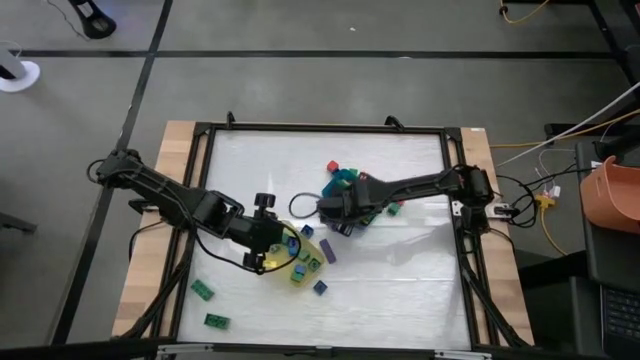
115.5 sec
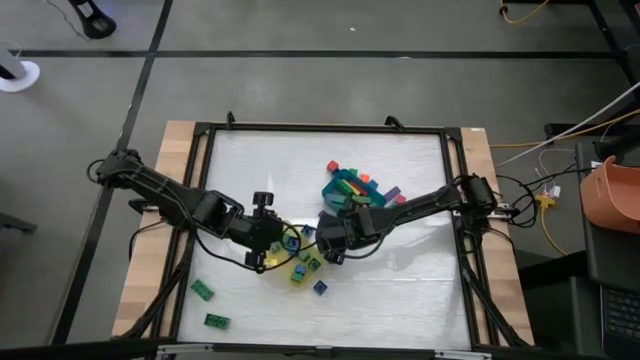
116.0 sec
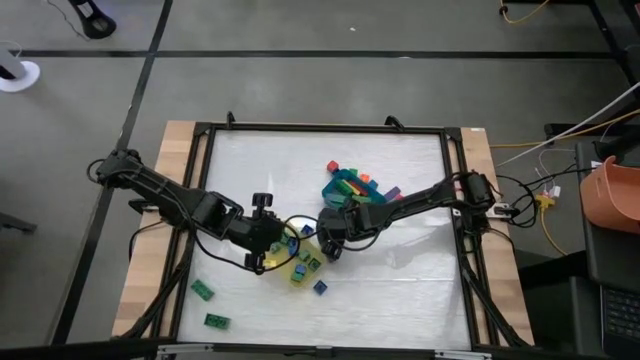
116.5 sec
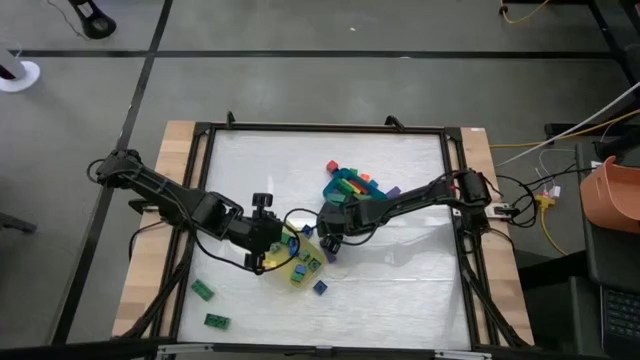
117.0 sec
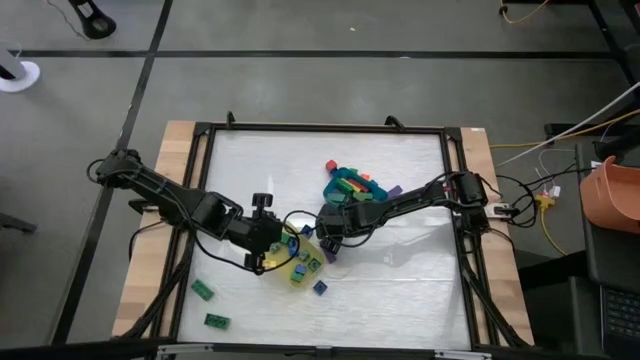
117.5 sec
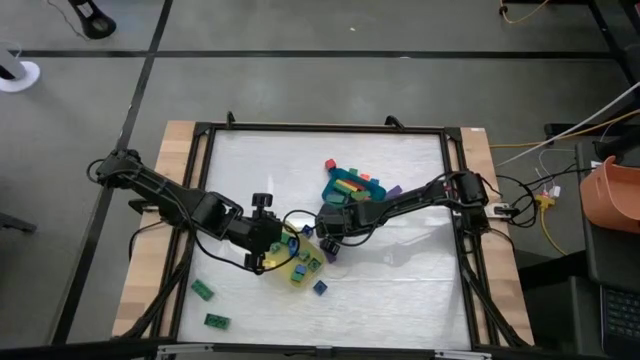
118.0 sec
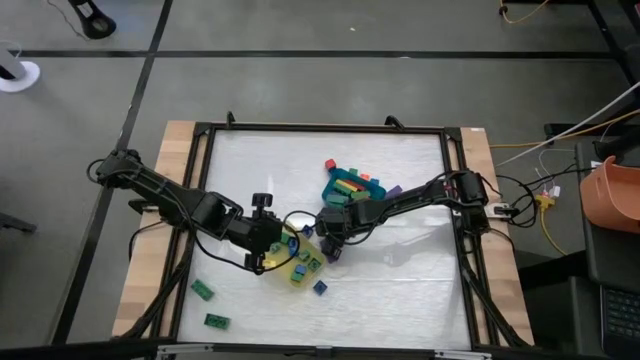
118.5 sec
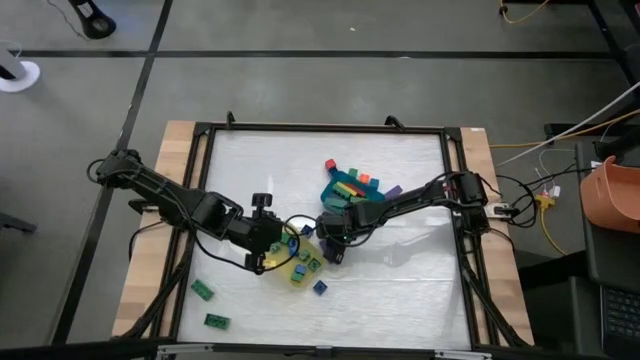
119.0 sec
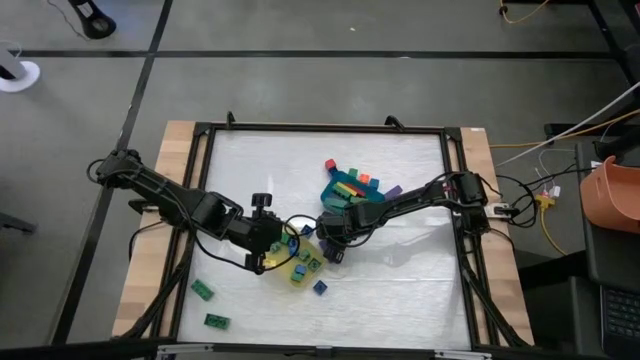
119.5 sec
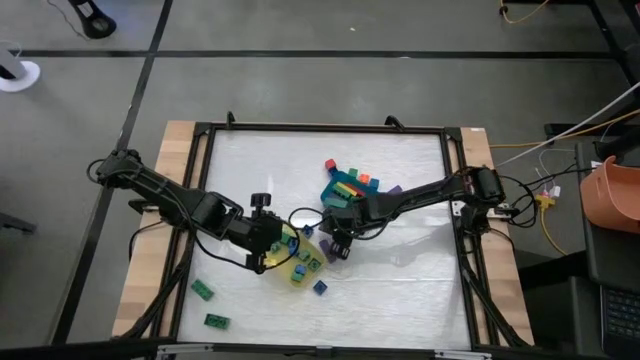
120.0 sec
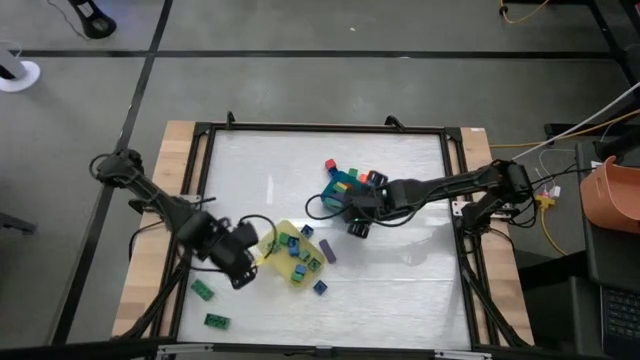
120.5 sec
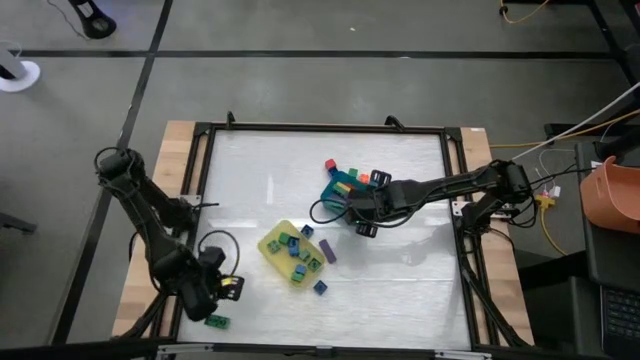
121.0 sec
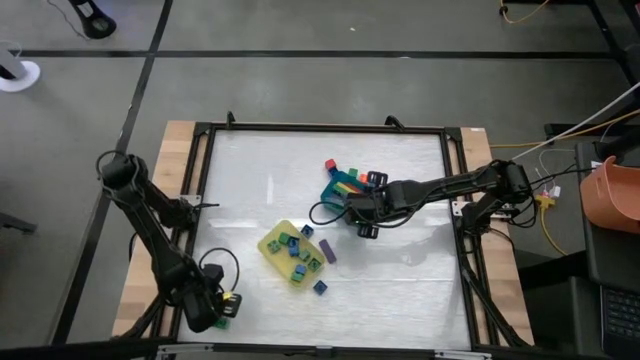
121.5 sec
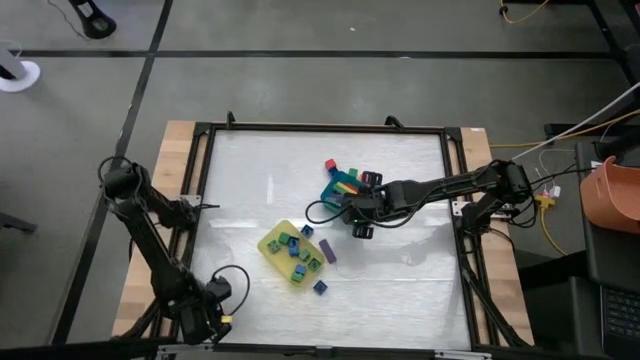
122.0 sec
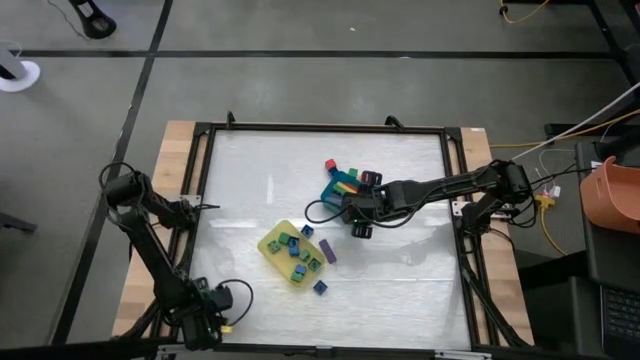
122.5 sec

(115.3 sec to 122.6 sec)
Task: Sort blocks by size
Put the large violet wooden block into the blue bin

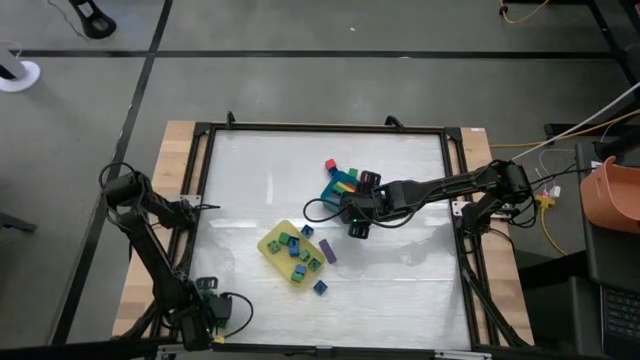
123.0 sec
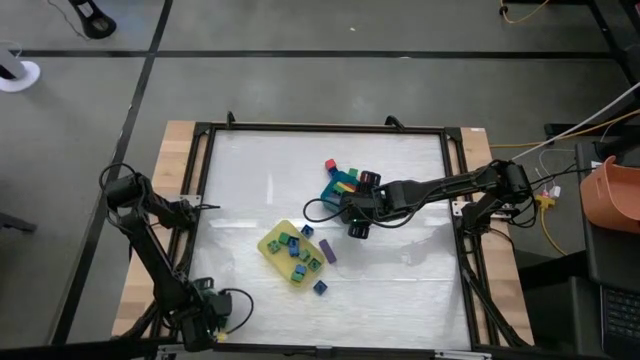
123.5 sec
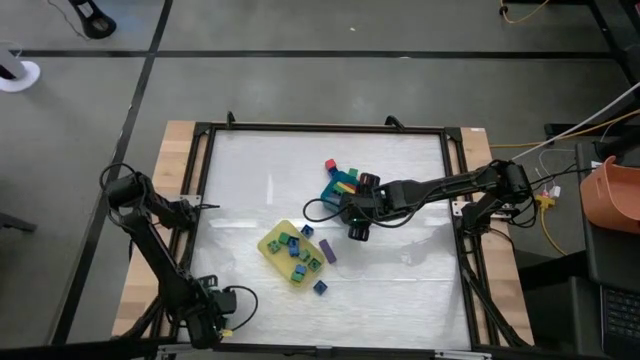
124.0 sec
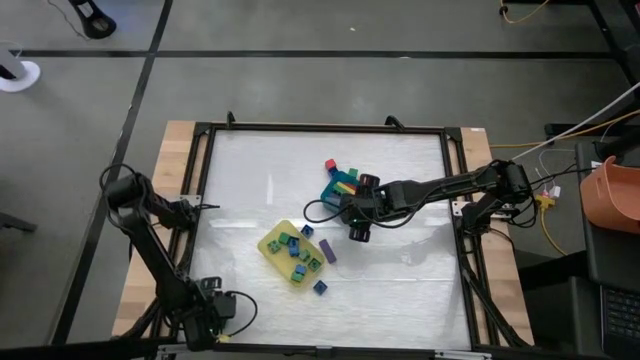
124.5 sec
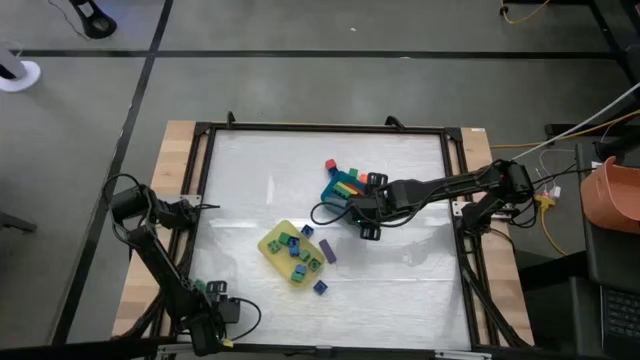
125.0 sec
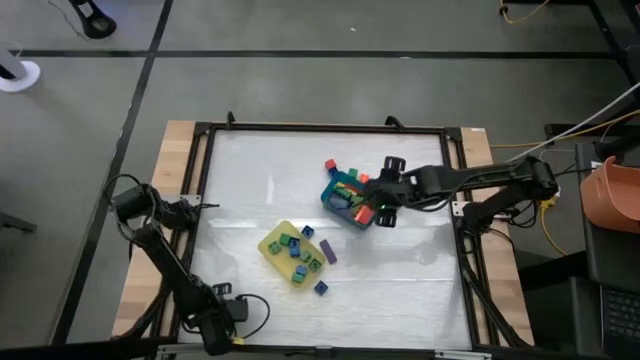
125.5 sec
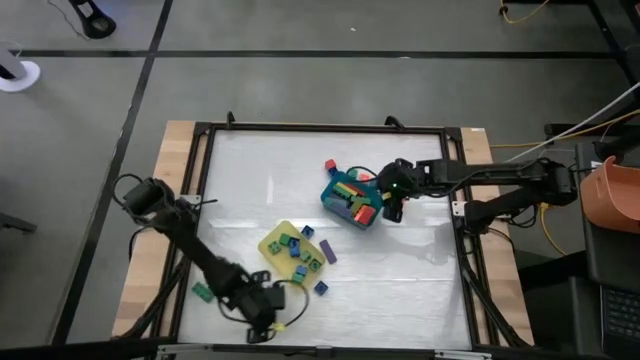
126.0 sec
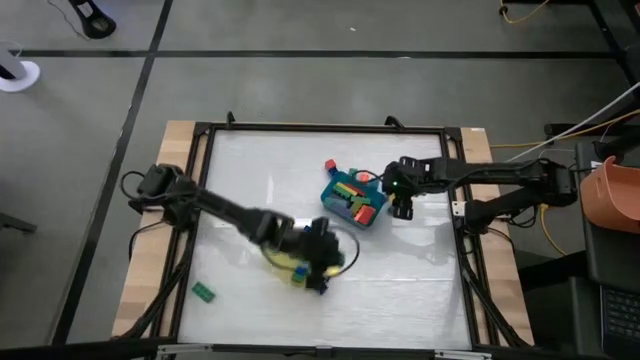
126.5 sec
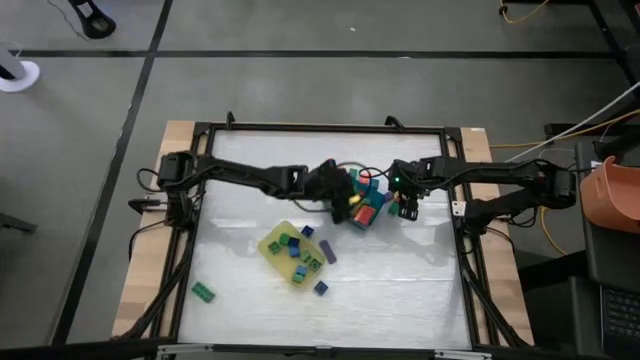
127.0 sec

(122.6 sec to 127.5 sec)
Put the large green game piece into the blue bin

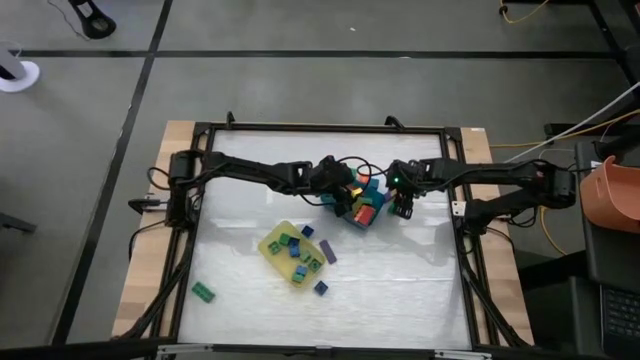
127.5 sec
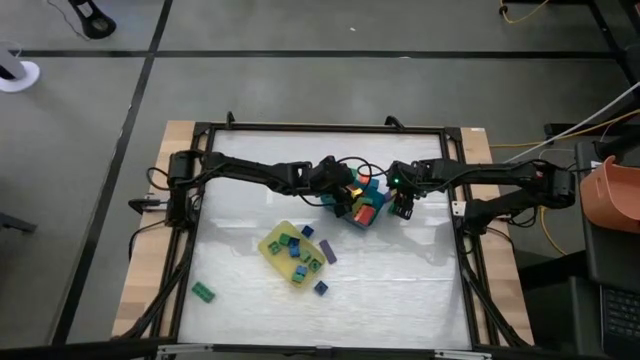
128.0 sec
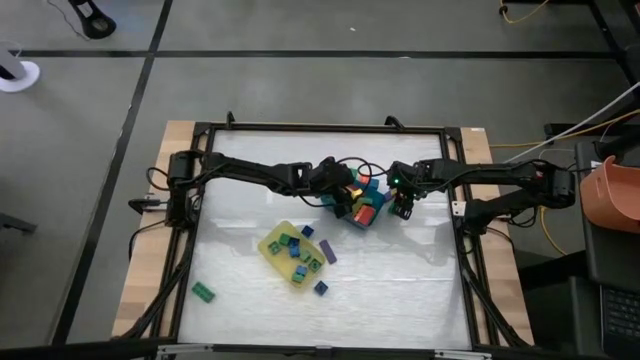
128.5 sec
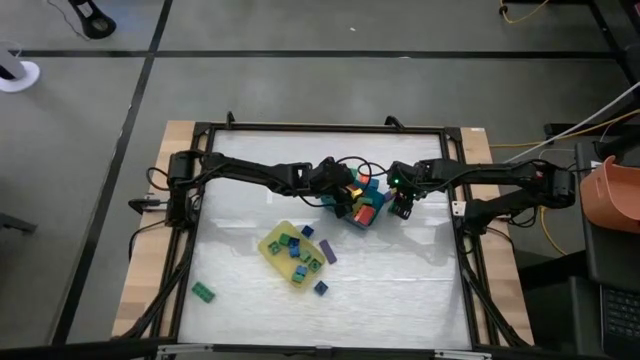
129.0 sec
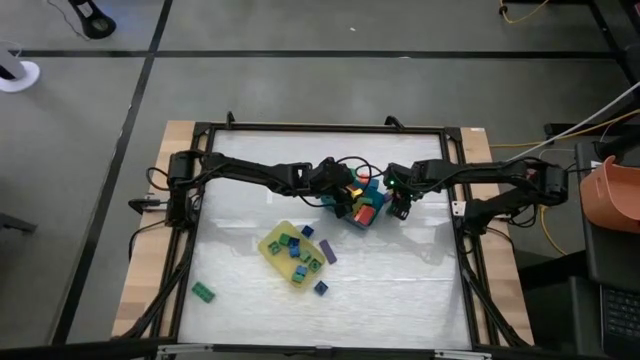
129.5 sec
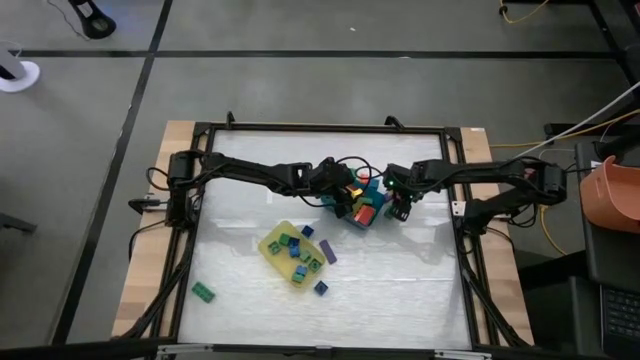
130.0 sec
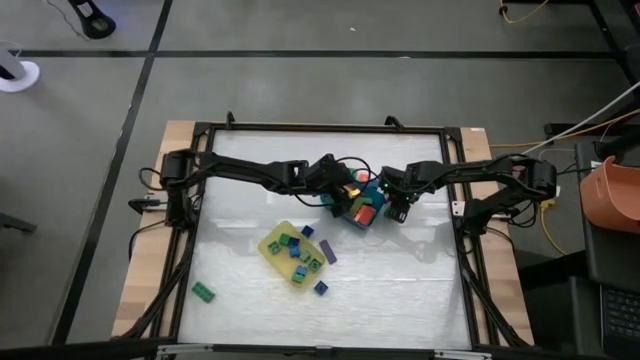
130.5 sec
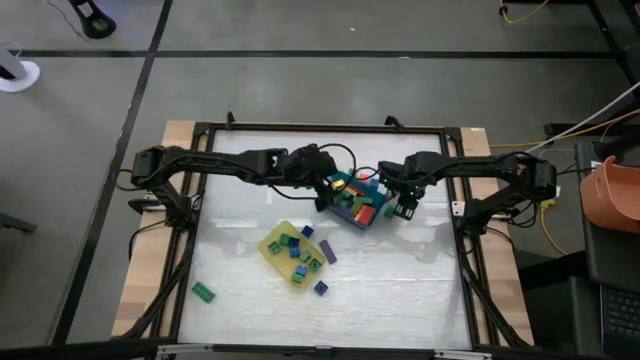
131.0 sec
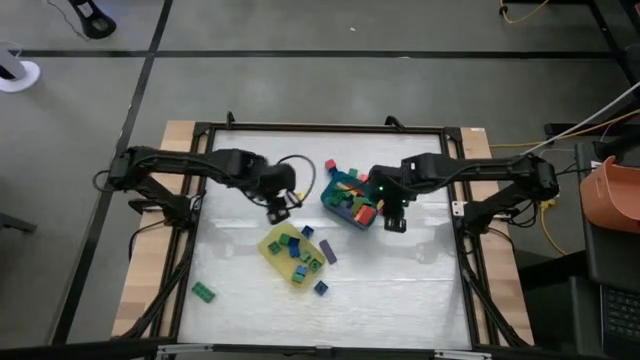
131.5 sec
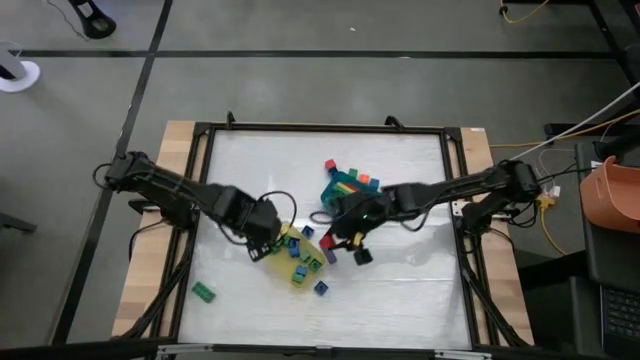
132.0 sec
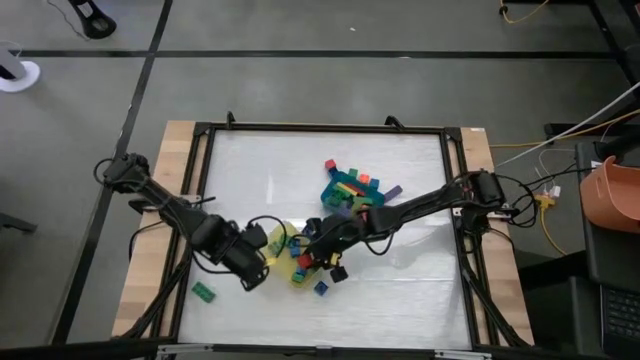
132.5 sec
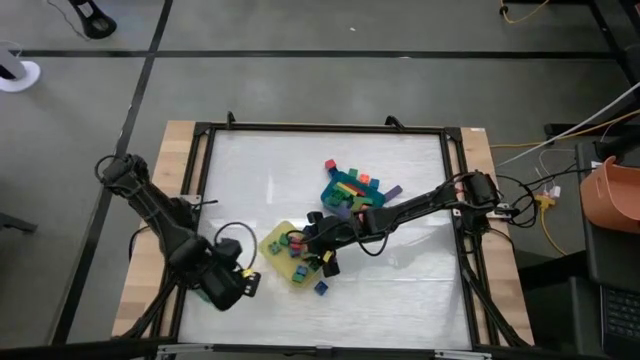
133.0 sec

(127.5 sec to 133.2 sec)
Put the small red wooden block into the yellow bin

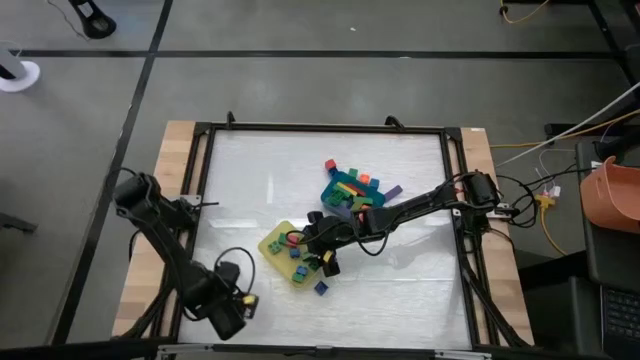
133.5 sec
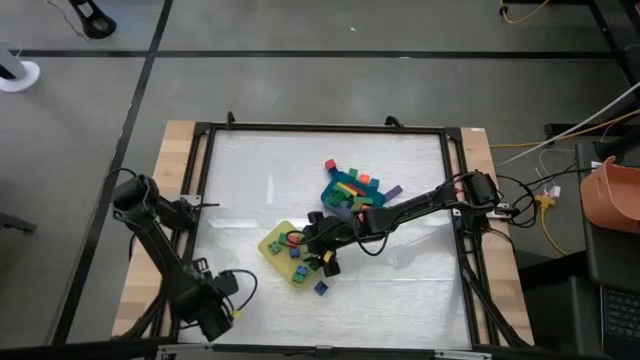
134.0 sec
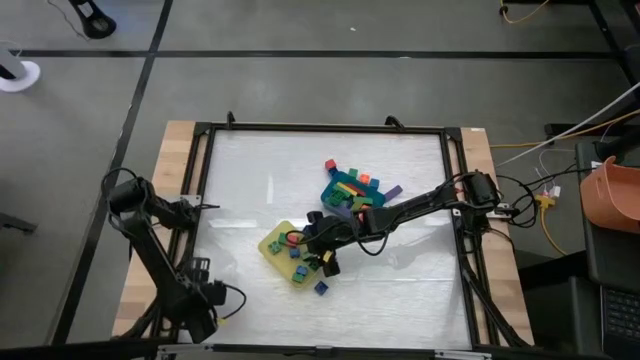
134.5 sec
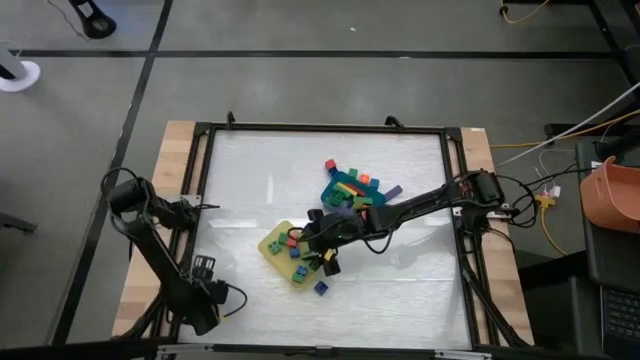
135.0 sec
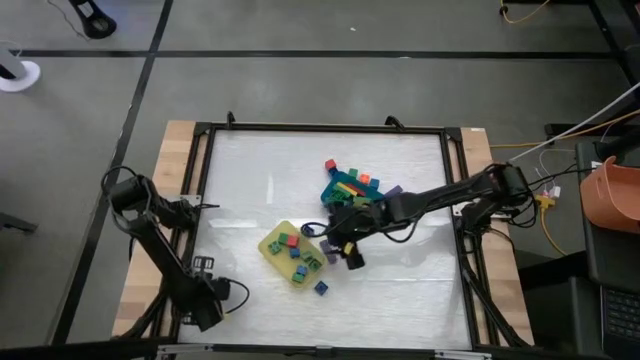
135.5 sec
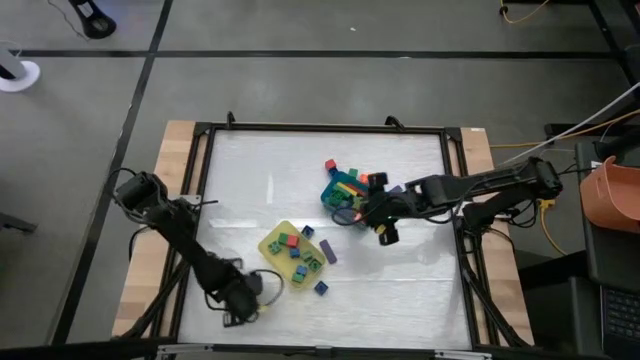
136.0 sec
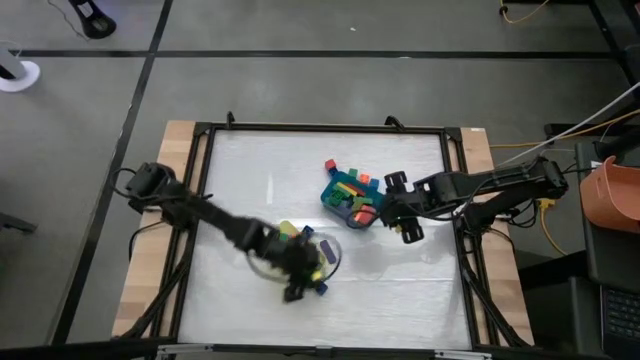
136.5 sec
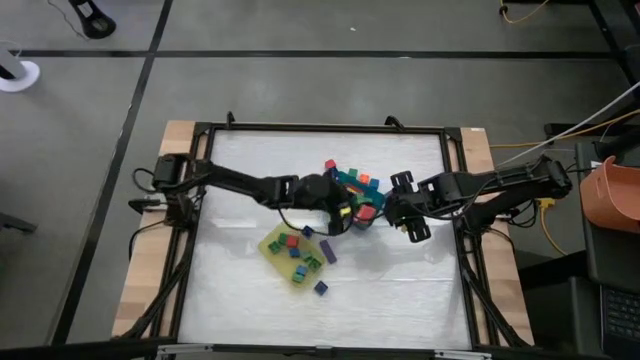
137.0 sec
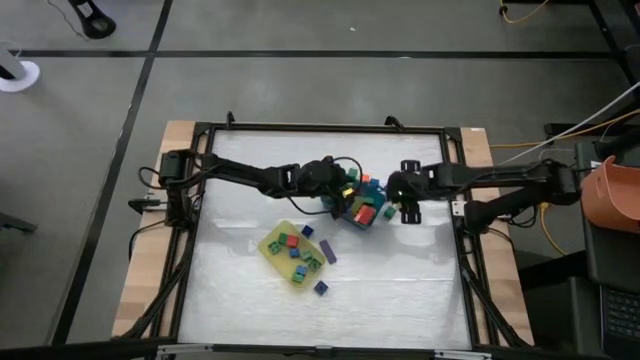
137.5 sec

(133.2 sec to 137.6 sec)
Put the large green game piece into the blue bin
